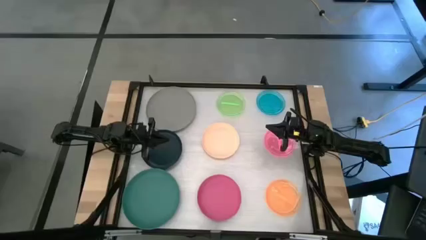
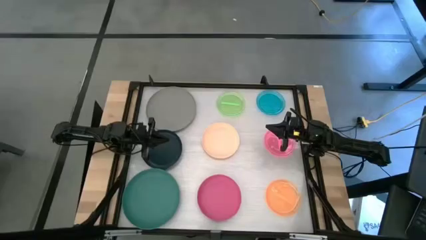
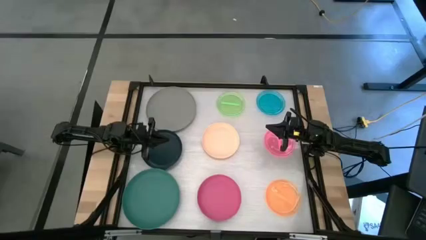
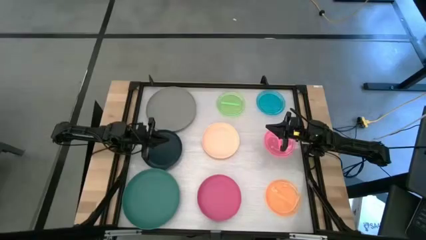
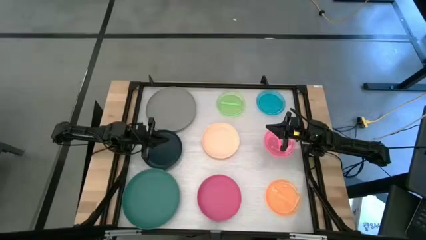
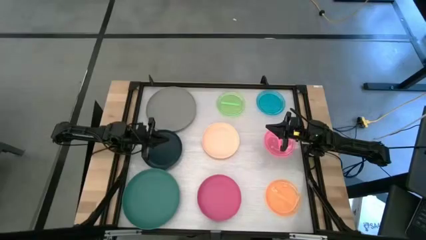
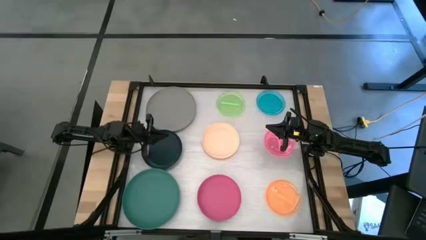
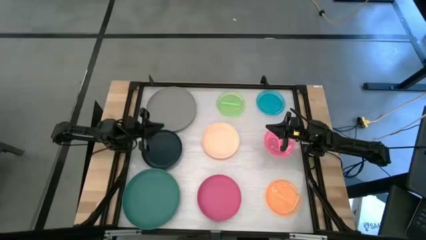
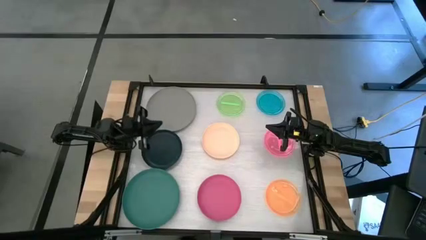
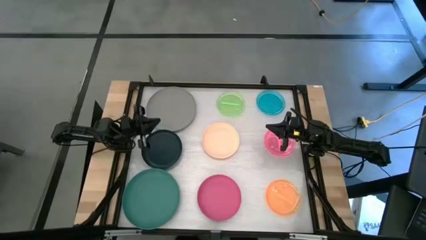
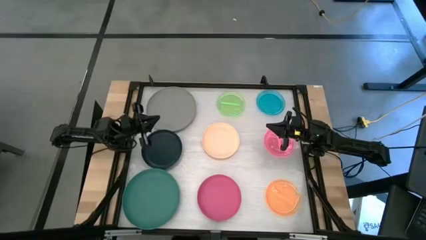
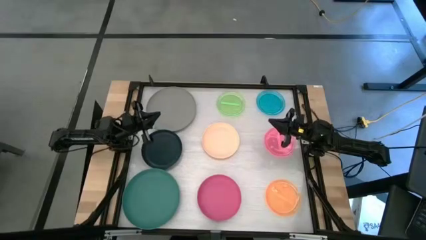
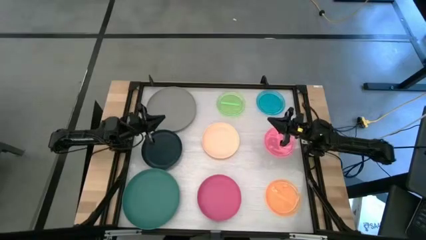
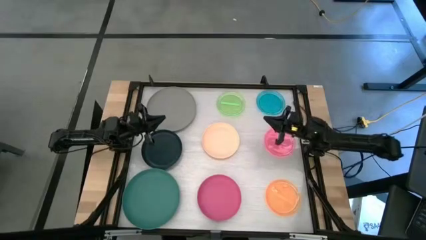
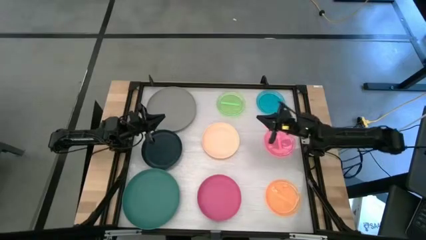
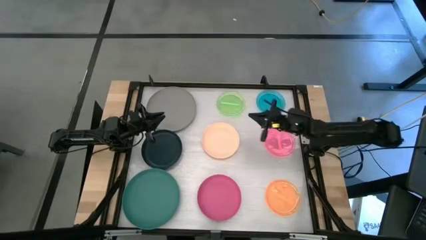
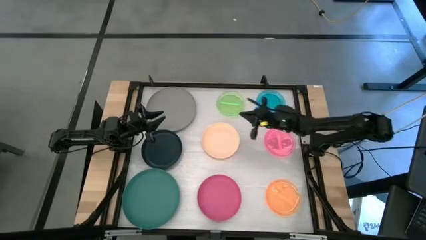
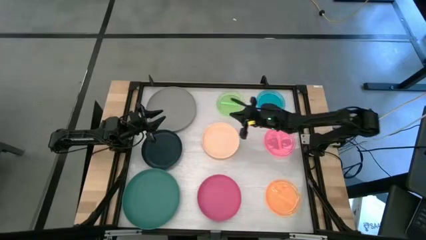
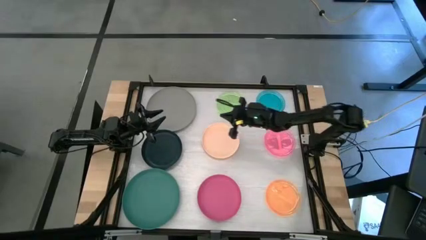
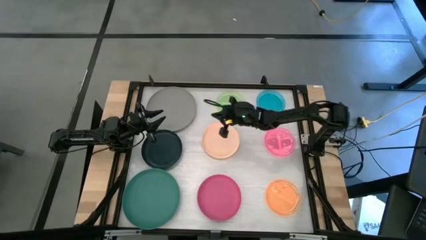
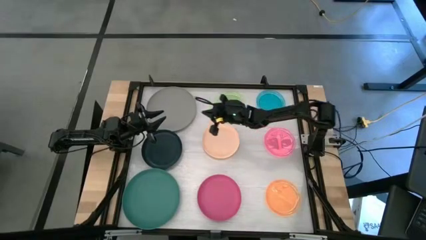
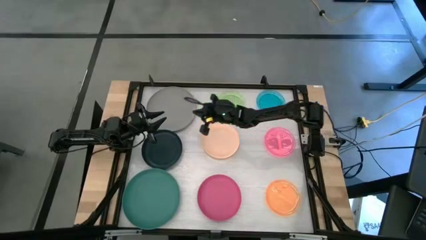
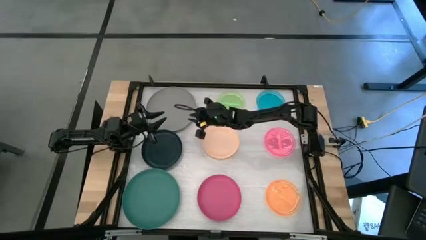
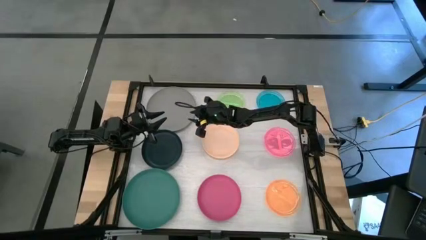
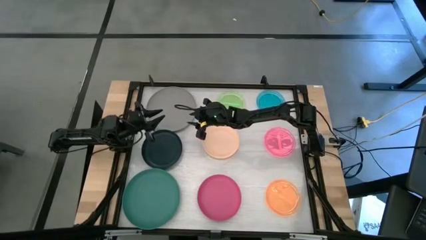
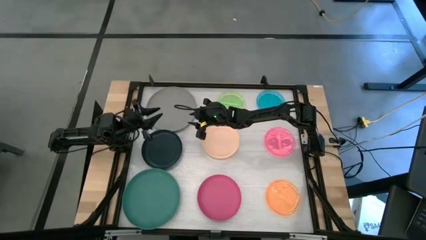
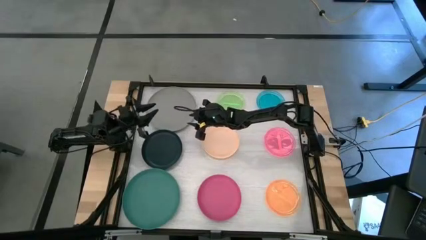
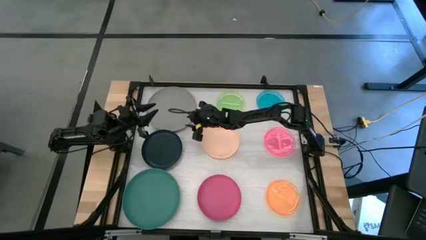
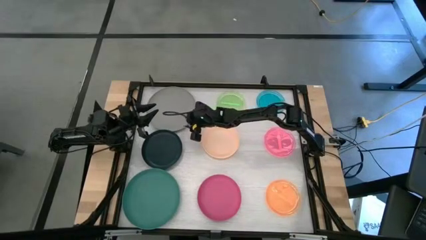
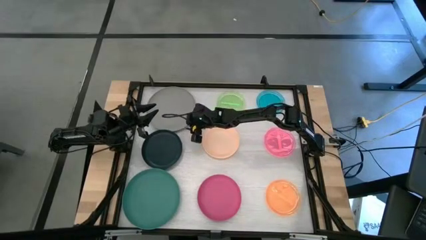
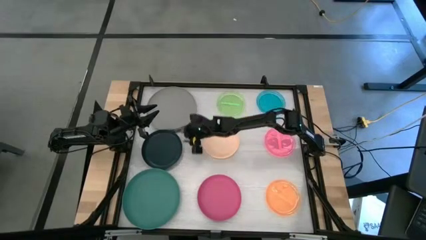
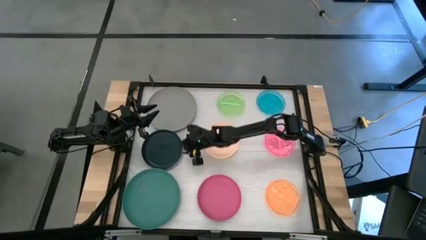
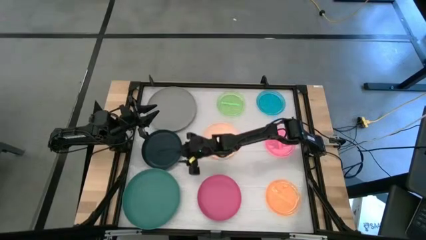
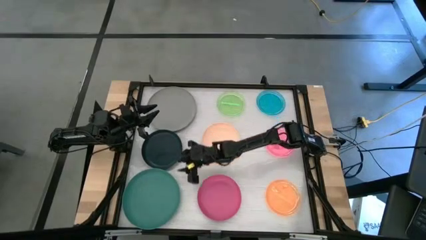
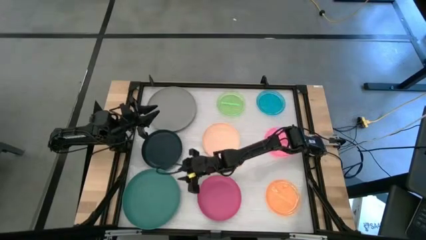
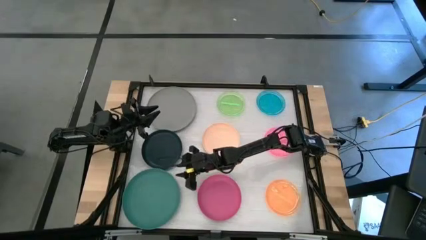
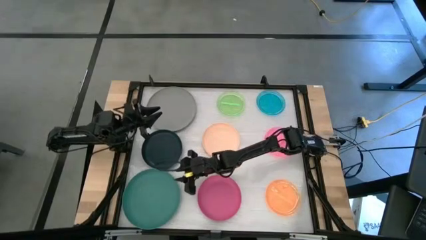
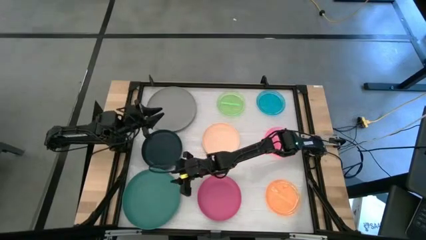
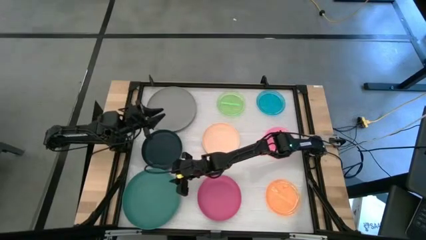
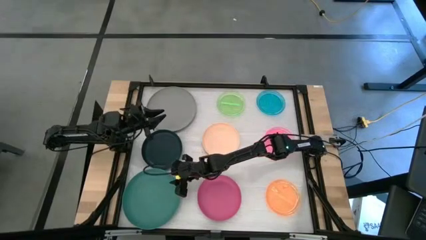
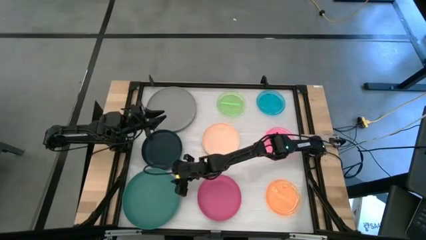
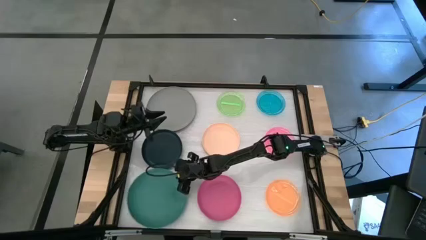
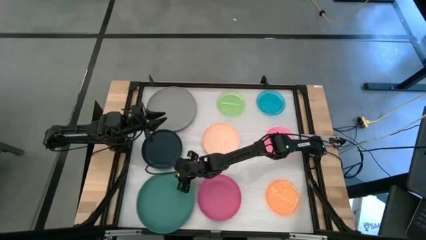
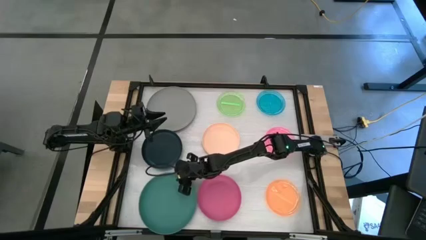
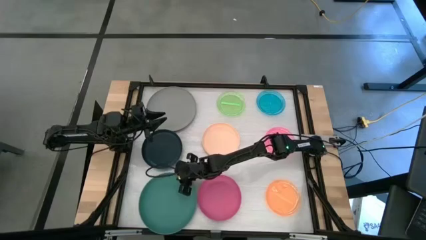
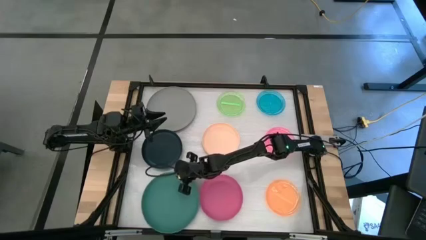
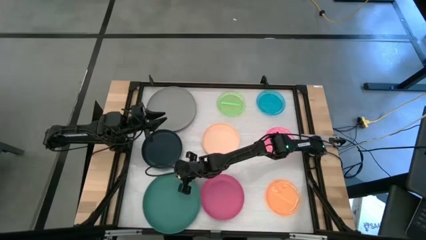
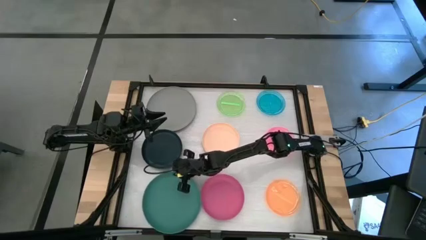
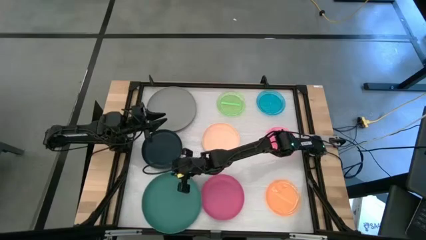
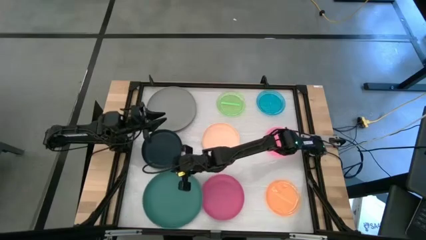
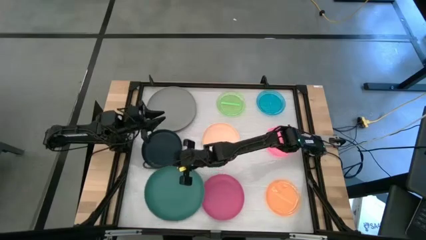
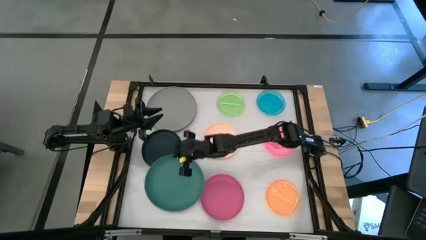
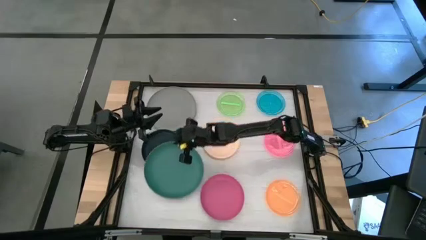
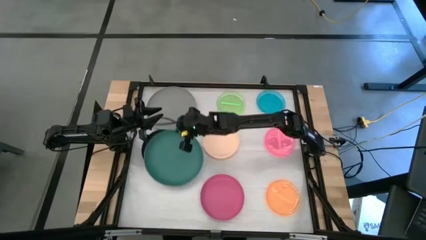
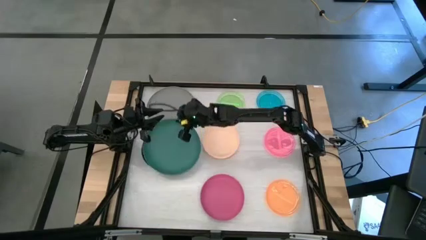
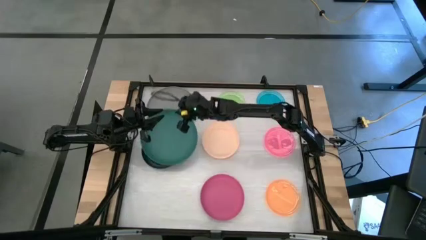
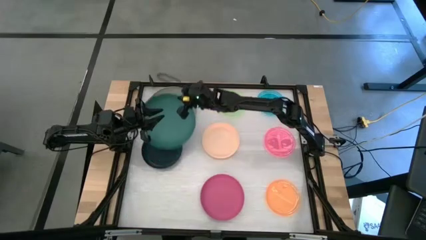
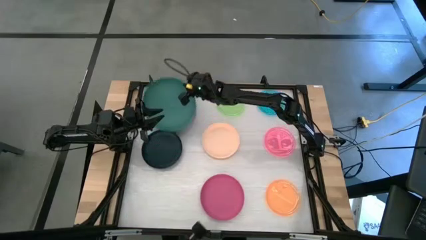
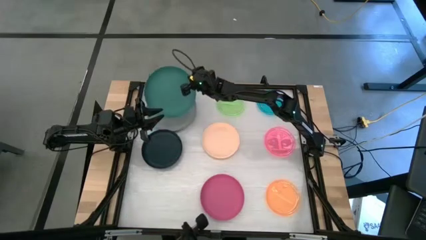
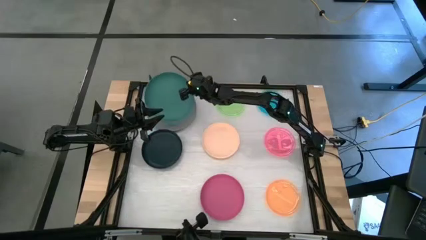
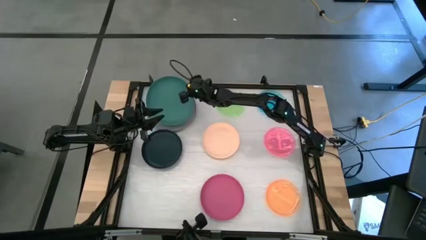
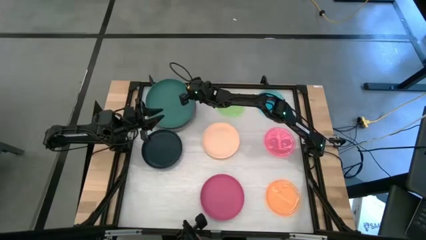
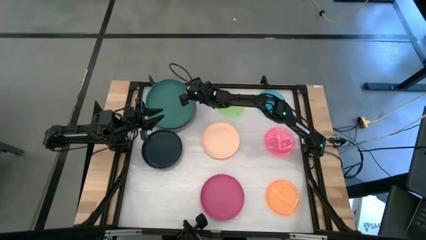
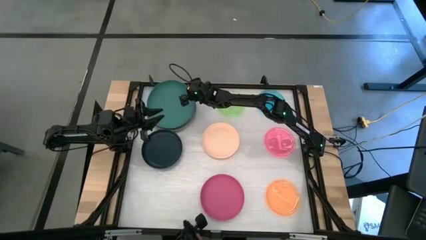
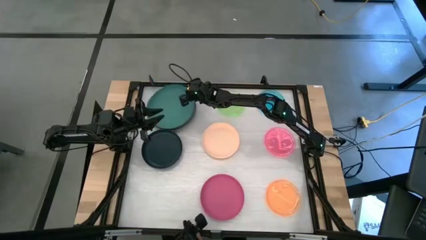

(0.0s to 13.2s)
Task: Stack plastic plates
Stack the green plate on the gray plate

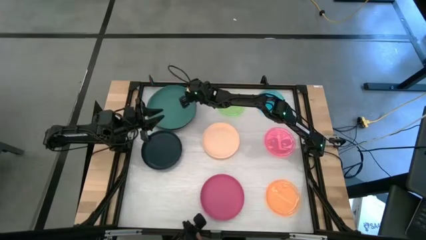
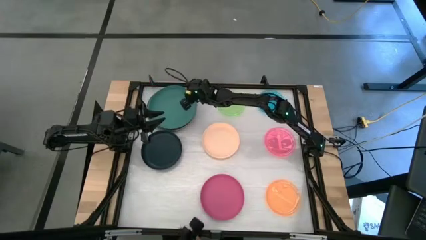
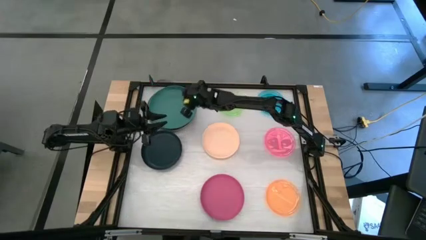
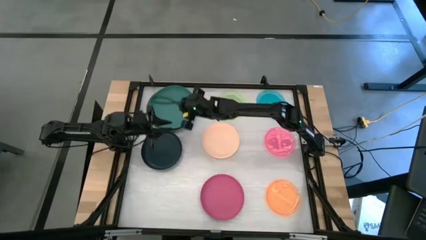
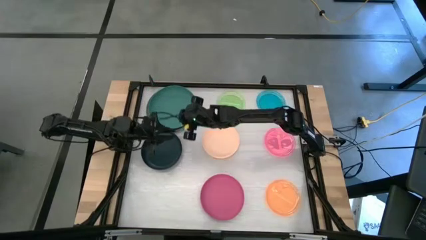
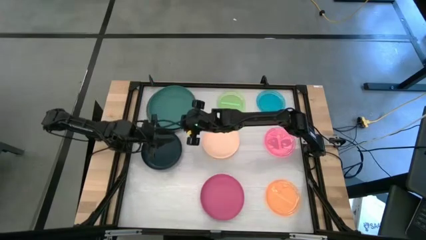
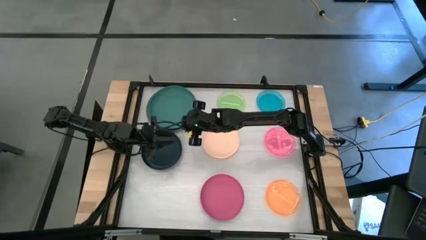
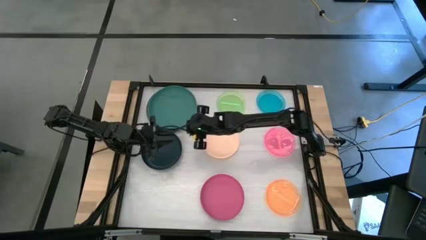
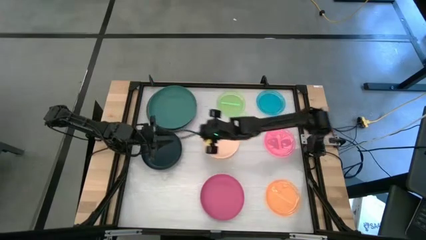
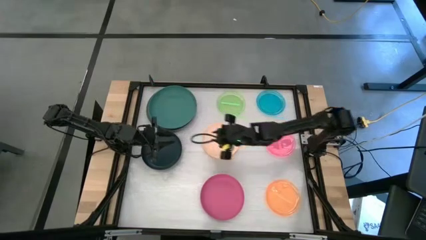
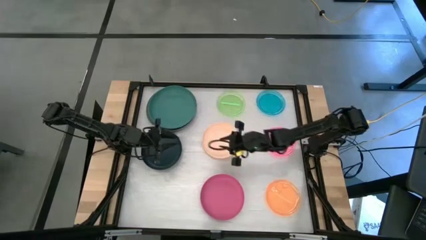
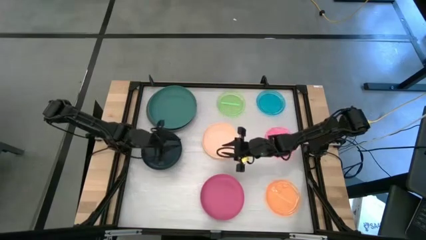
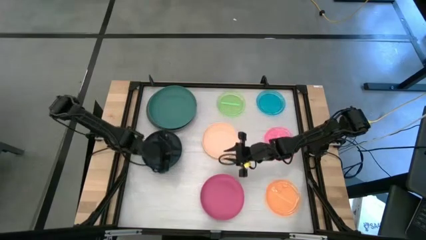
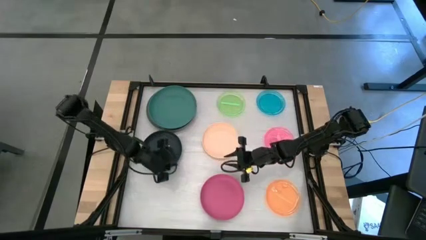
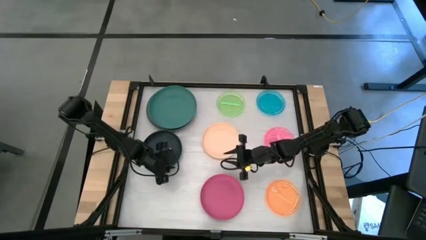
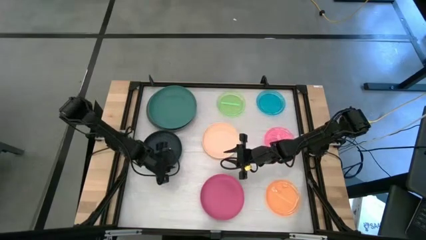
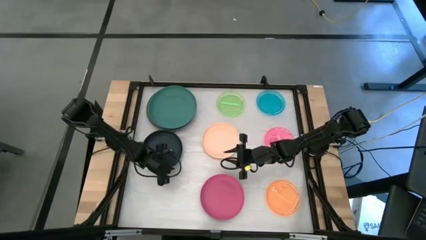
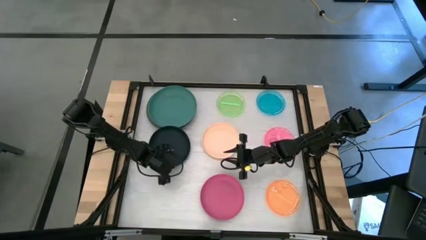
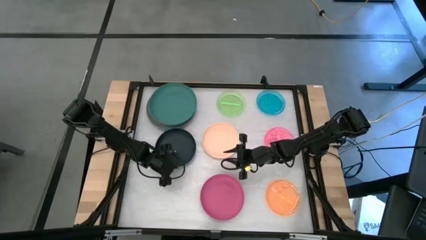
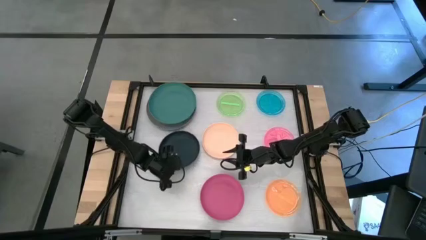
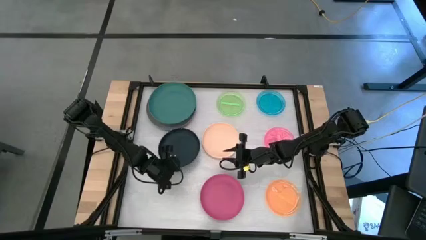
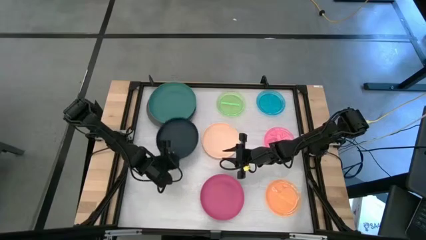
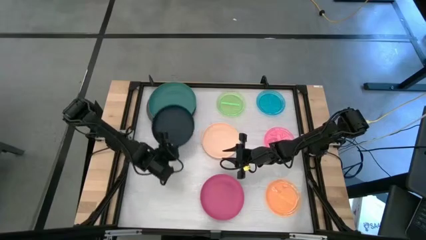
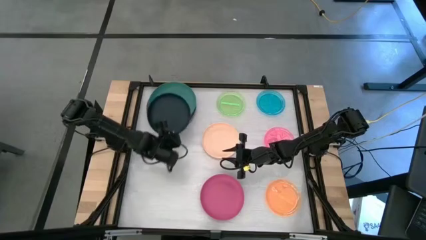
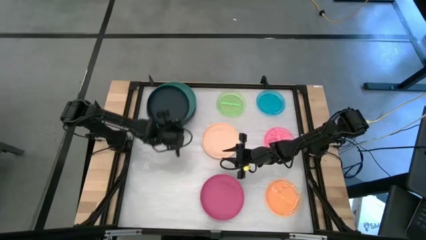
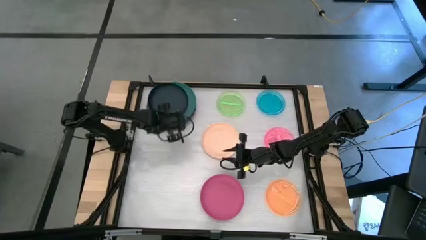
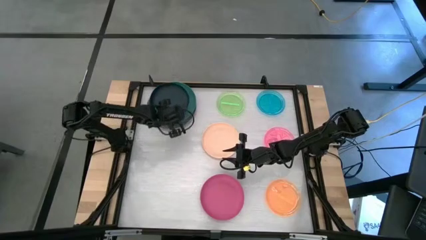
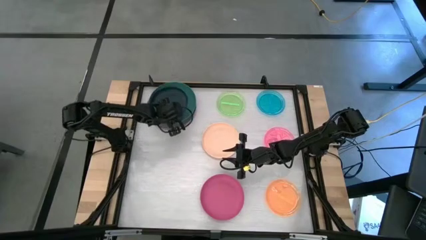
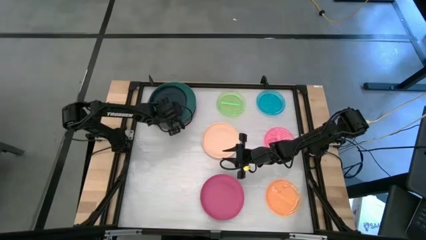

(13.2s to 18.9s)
Stack the black plate on the green plate
